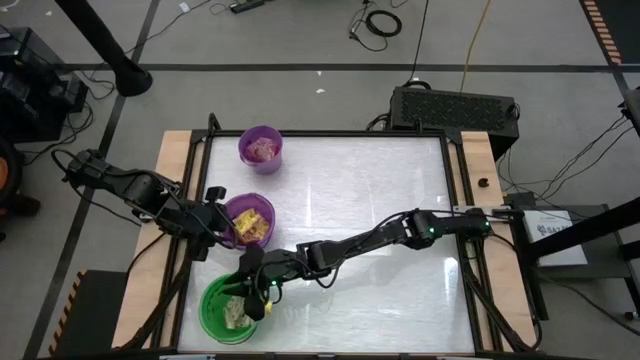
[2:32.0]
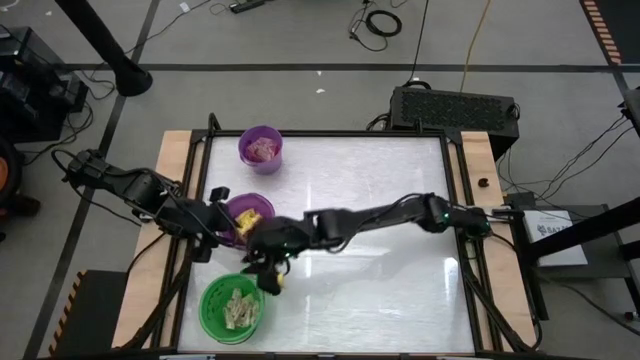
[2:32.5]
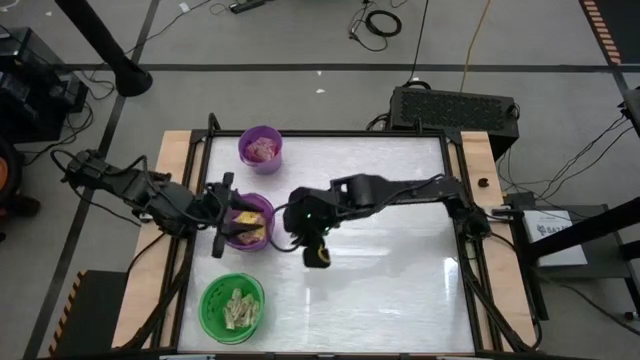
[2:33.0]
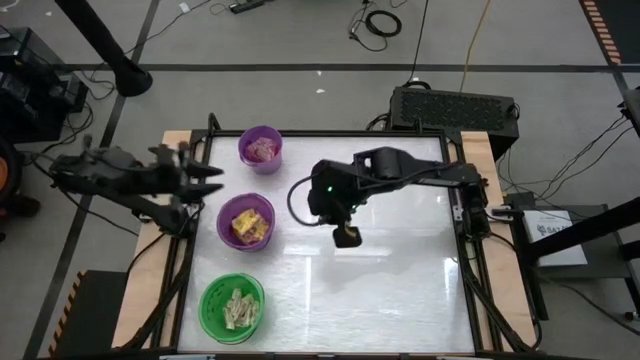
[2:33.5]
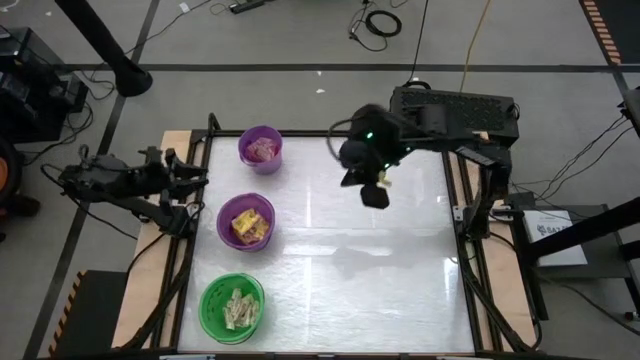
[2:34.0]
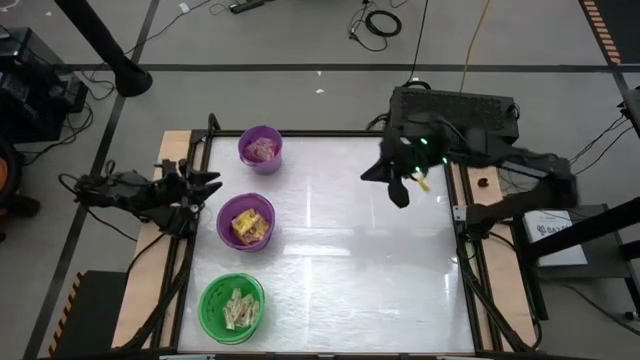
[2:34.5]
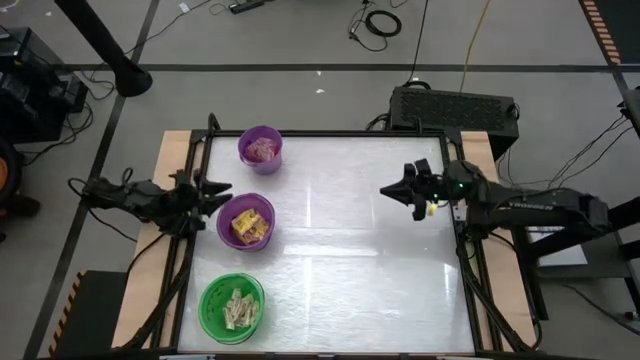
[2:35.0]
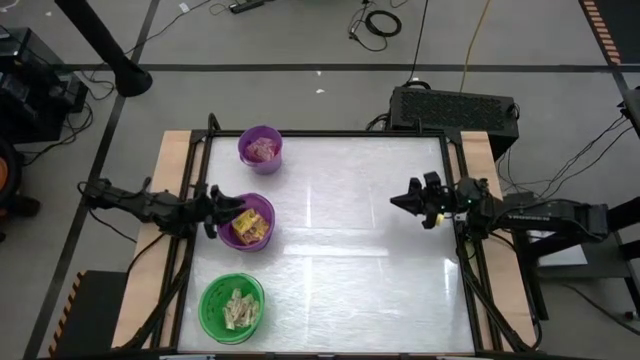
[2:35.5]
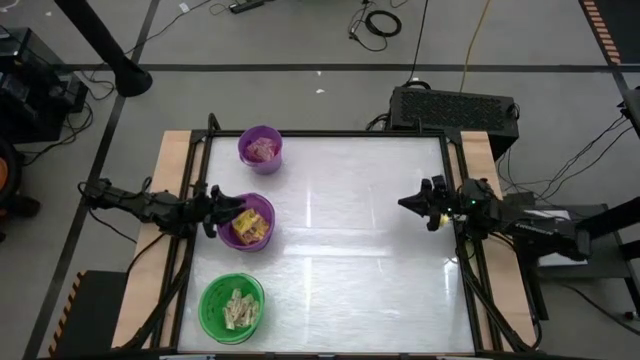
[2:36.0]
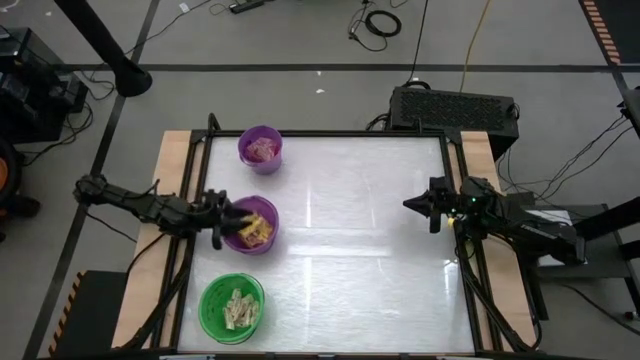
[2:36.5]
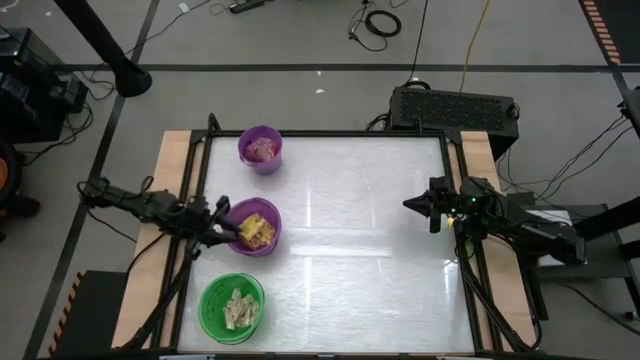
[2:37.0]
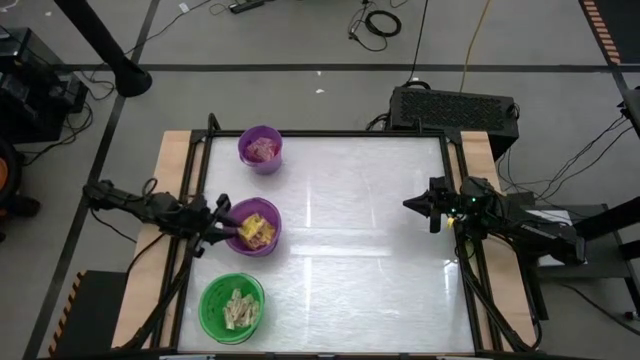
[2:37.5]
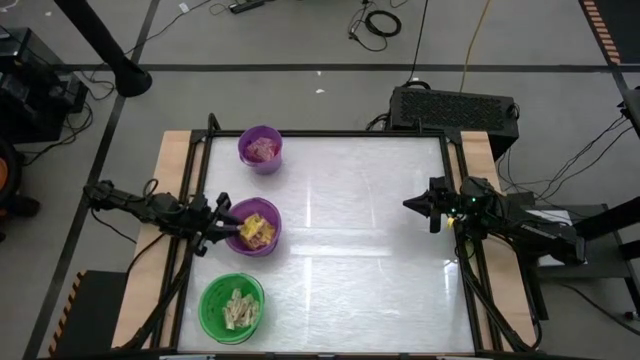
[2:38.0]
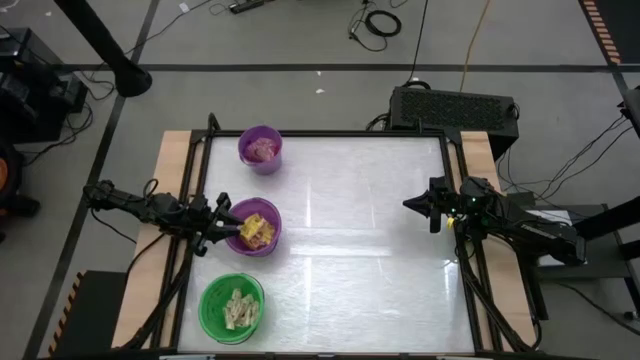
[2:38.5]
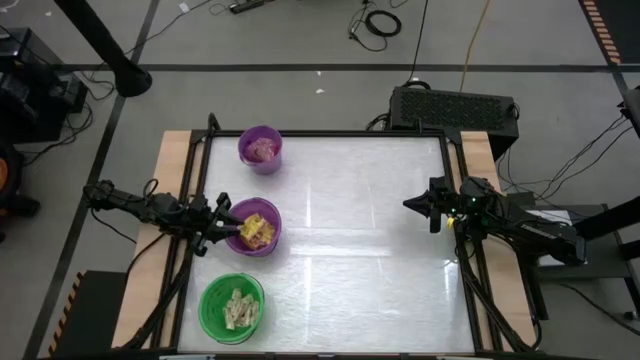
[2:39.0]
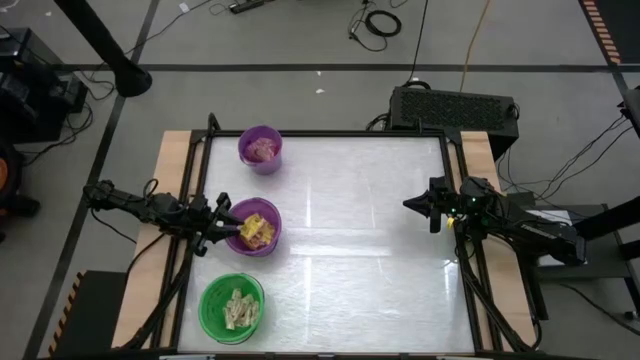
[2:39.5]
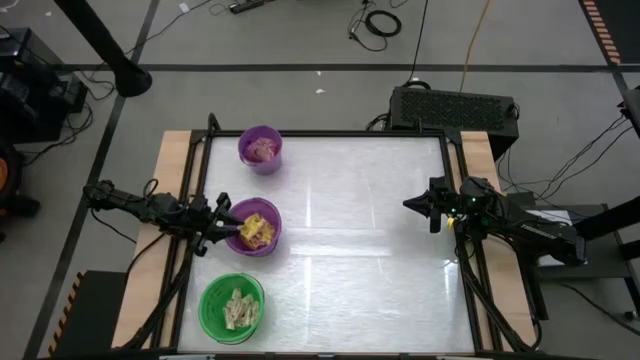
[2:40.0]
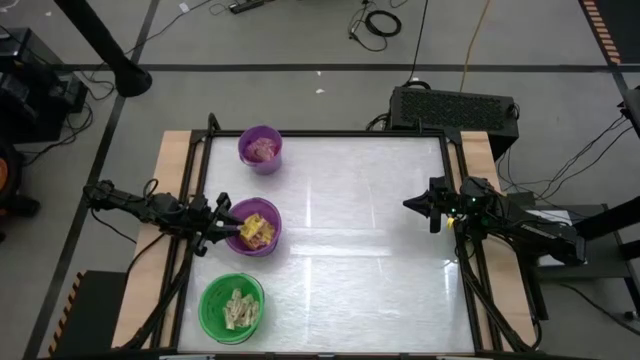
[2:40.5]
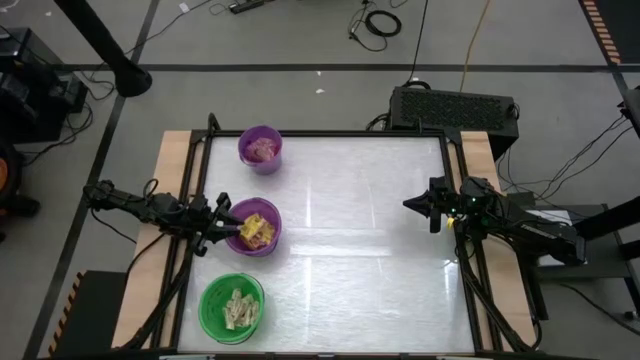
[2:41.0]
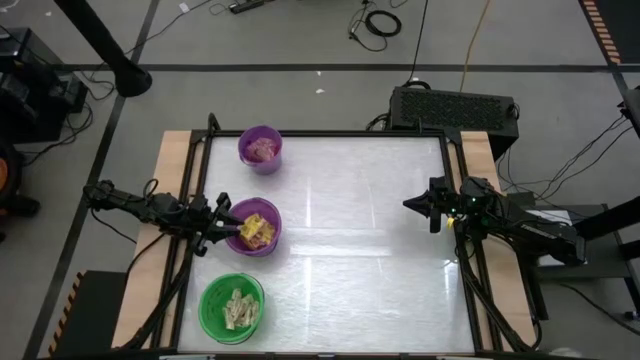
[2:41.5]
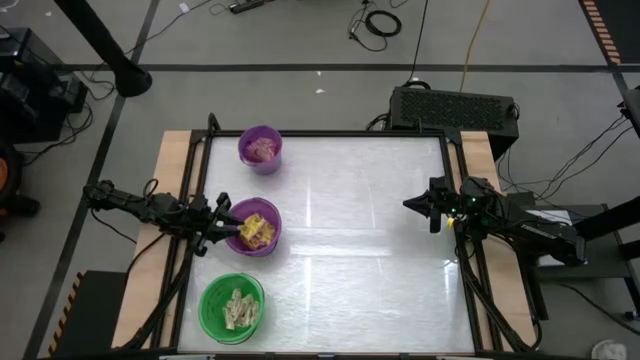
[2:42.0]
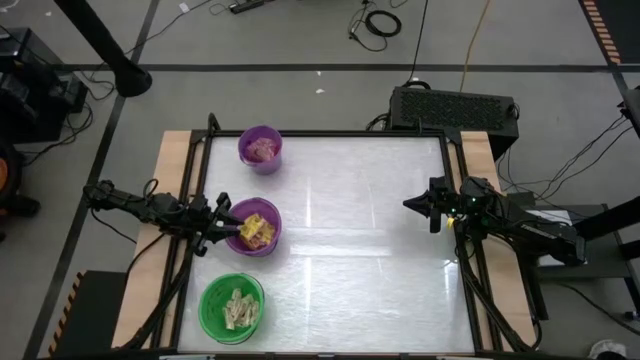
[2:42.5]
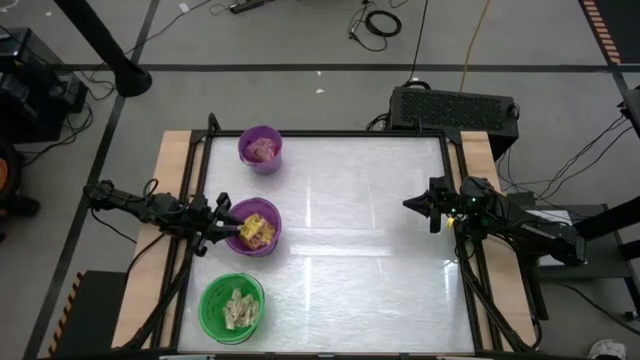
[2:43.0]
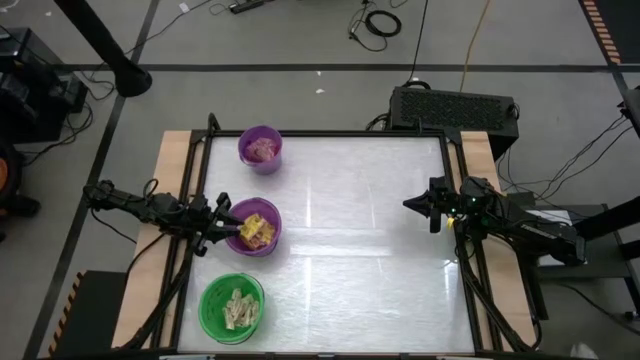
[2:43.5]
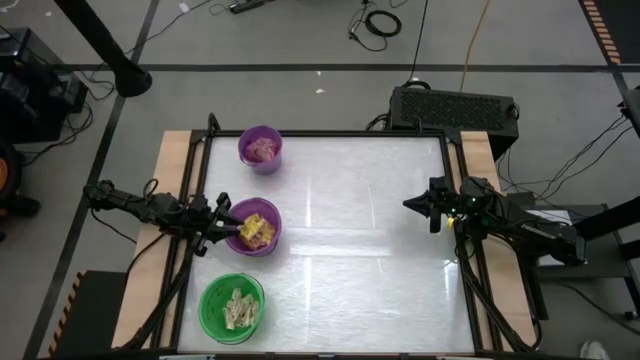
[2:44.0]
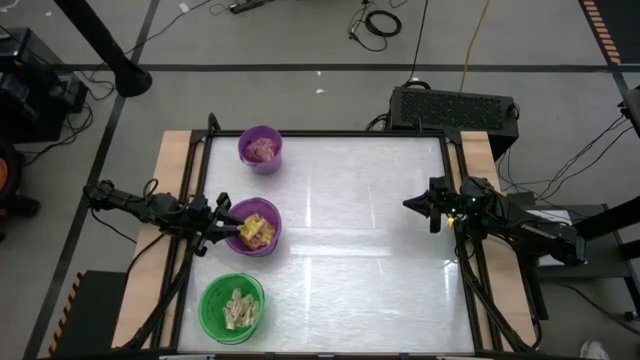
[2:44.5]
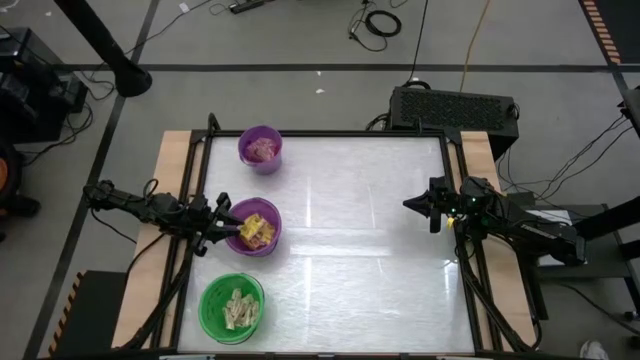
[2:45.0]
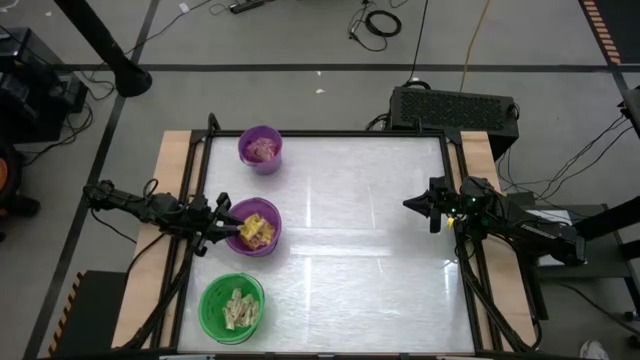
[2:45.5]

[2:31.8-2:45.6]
Task: Sort candy by brand, put in halloween buckets
Return to Home Position

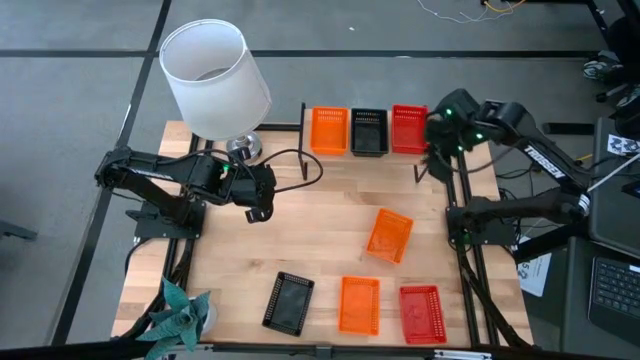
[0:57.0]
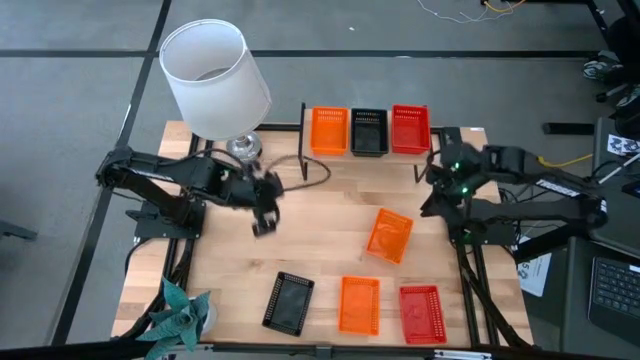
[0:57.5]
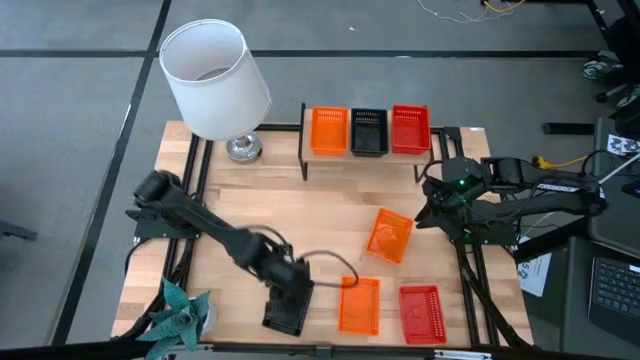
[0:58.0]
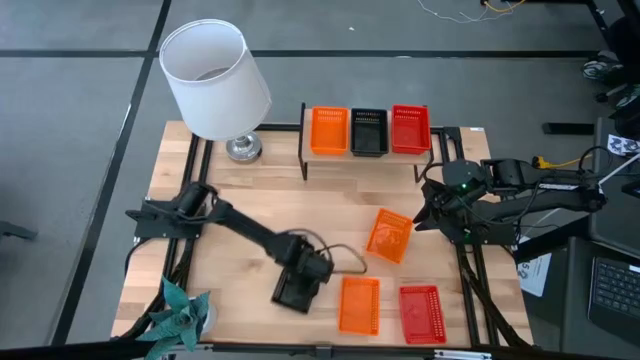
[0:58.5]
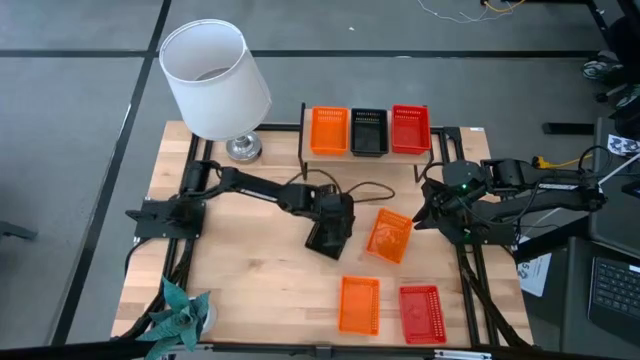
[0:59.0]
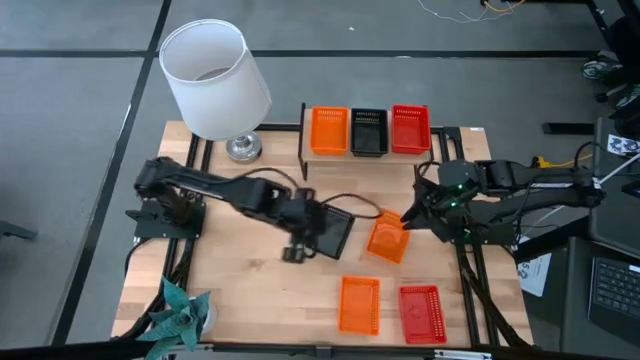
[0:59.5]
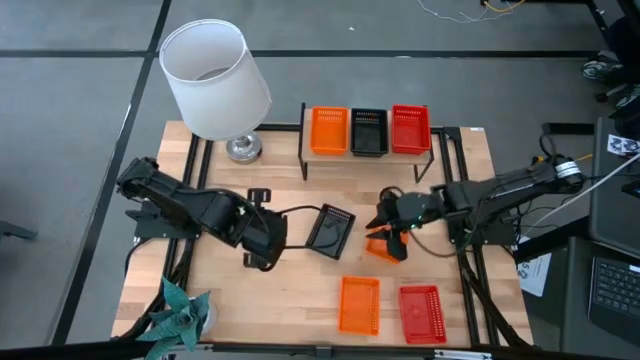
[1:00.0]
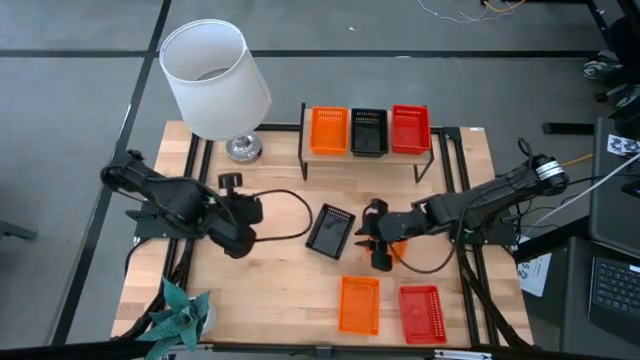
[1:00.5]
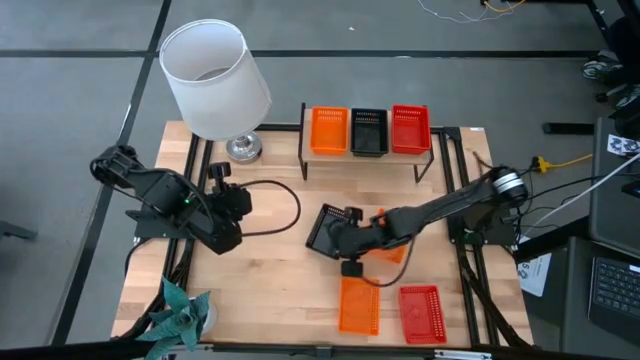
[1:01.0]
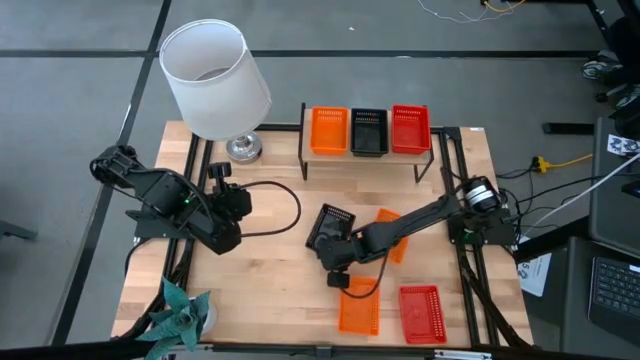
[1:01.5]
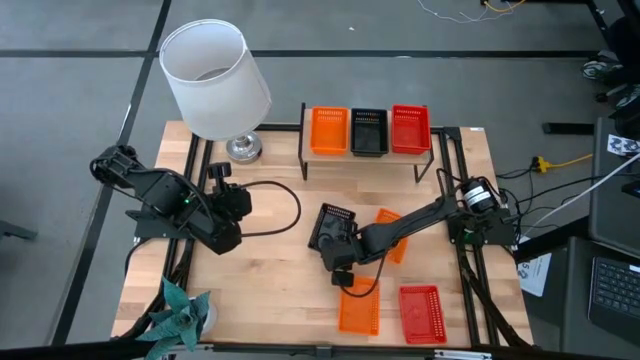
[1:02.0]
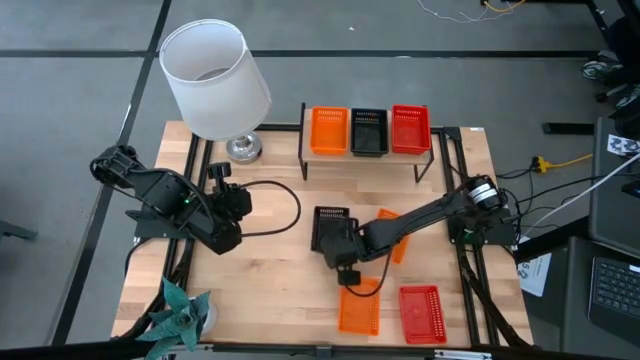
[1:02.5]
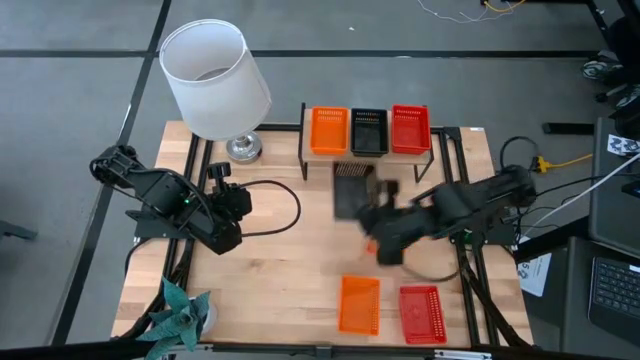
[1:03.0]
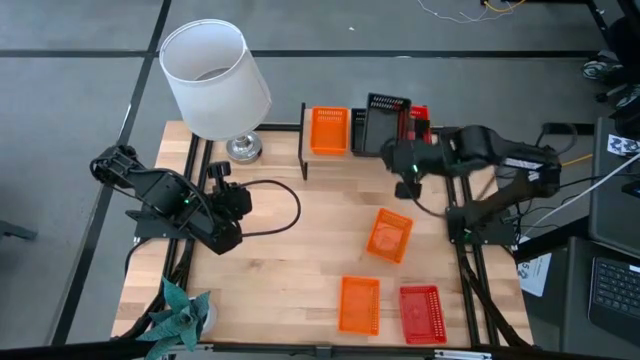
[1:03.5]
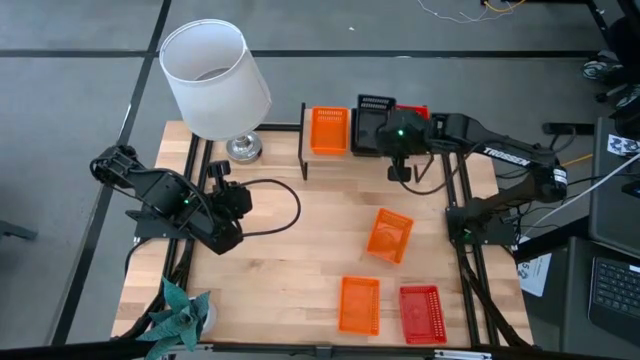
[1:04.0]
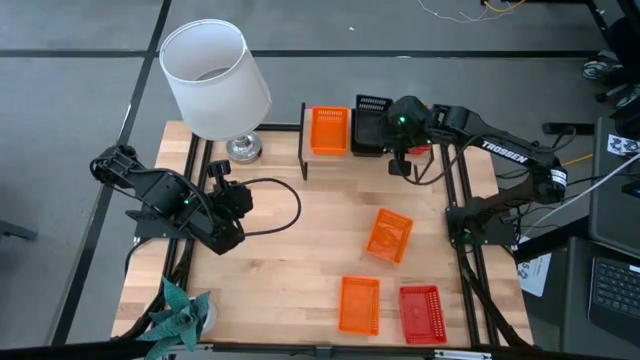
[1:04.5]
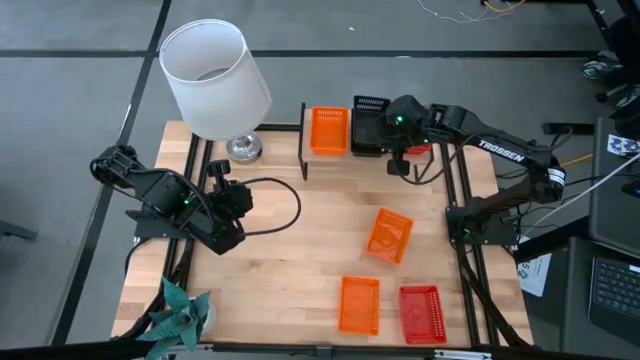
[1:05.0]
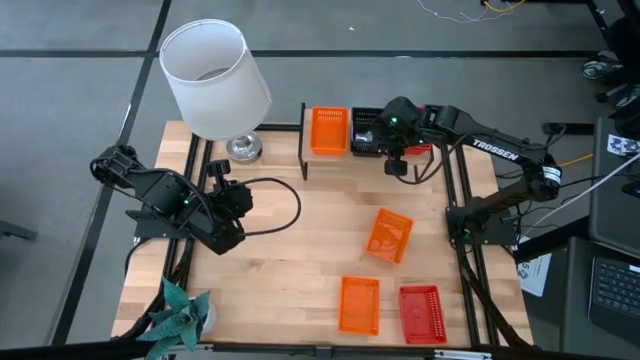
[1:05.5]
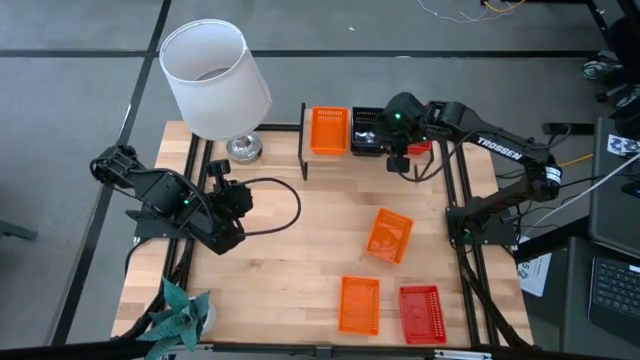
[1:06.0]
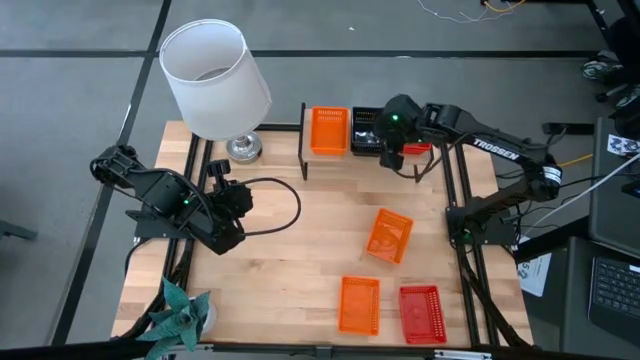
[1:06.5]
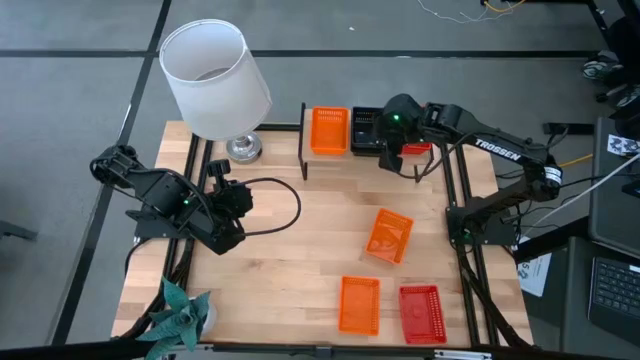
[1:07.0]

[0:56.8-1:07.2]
Task: Stack baskets on shelf by color
Stack the black bin on the black bin on the shelf
